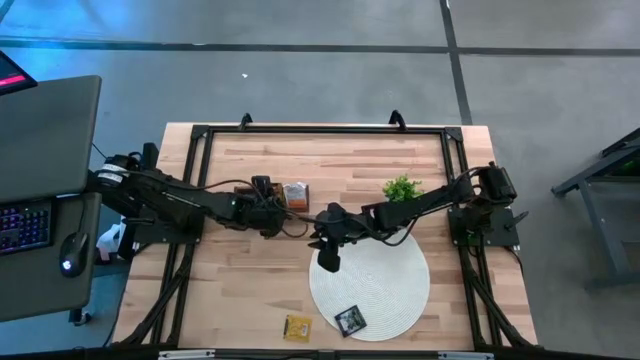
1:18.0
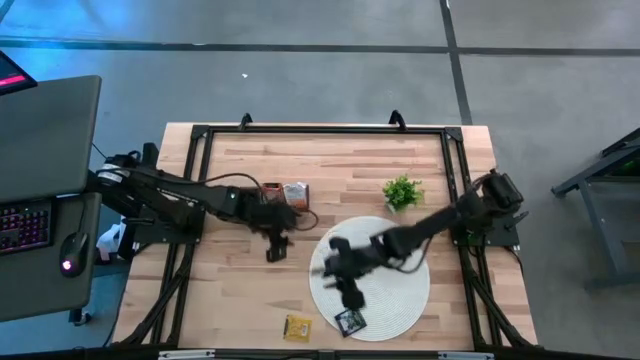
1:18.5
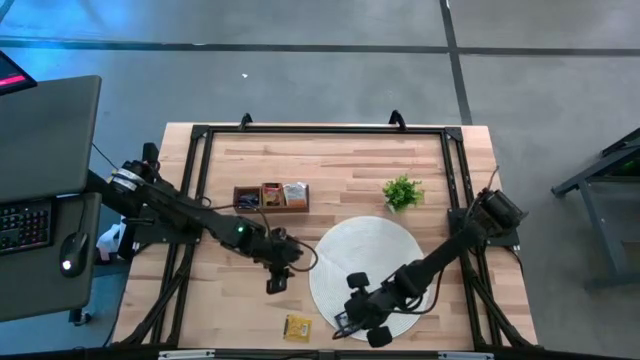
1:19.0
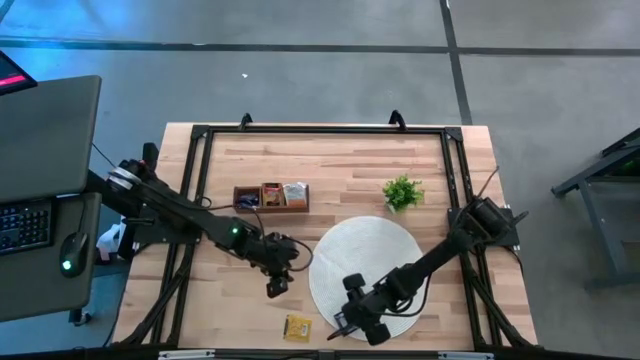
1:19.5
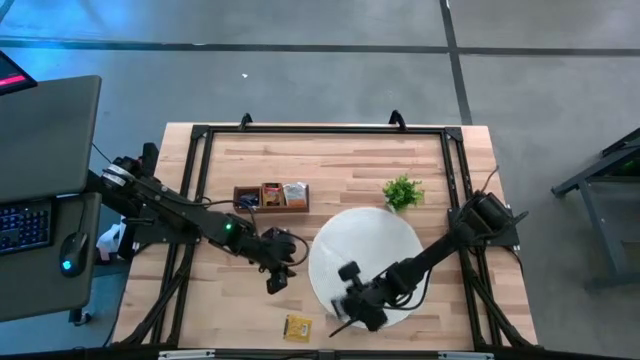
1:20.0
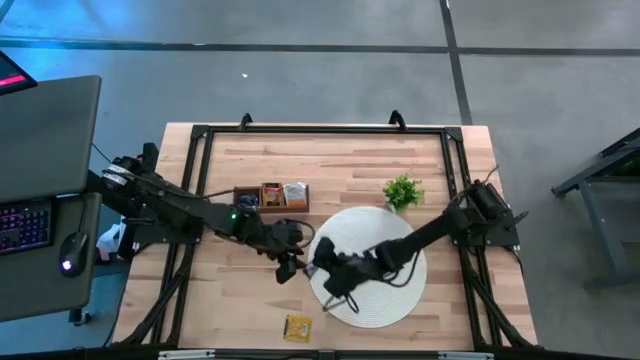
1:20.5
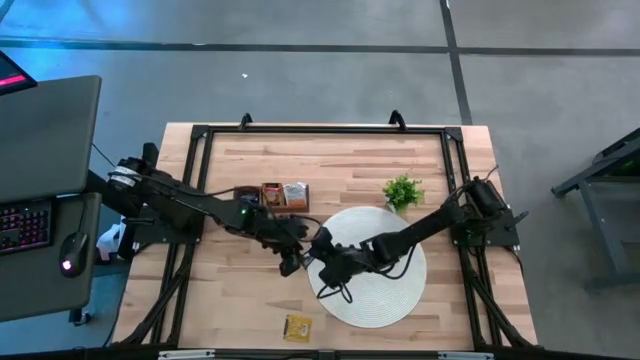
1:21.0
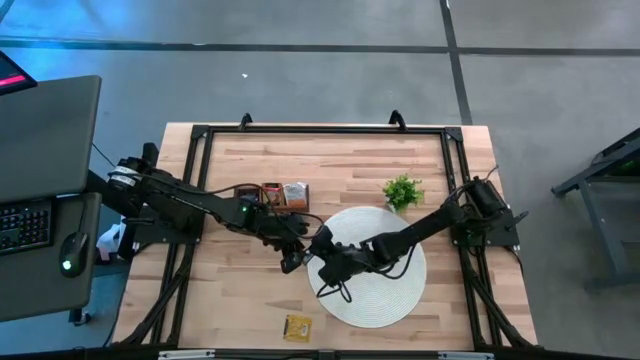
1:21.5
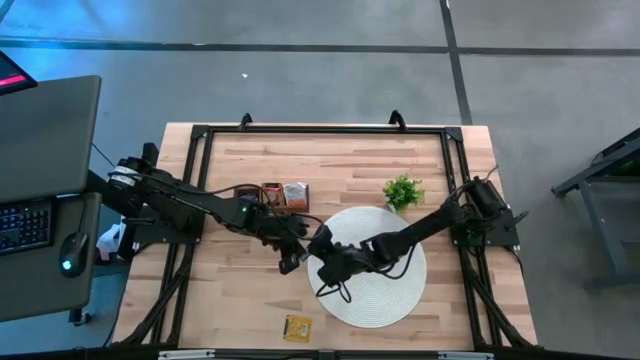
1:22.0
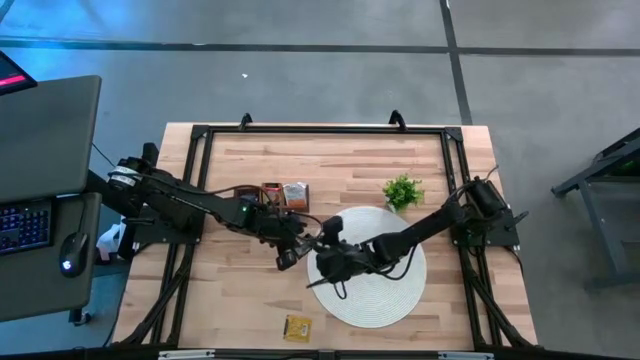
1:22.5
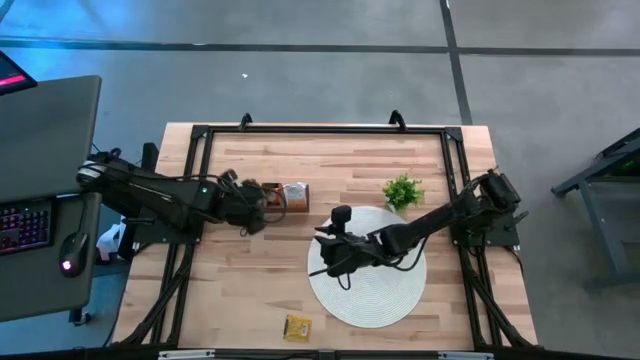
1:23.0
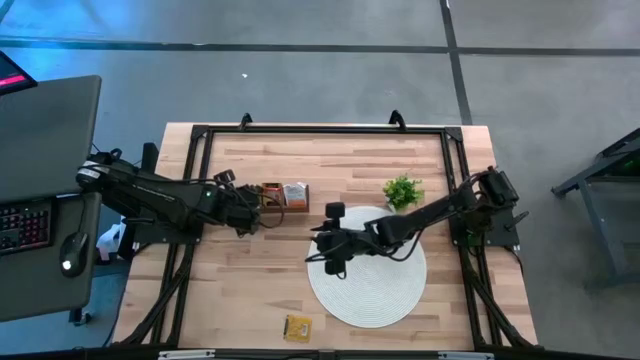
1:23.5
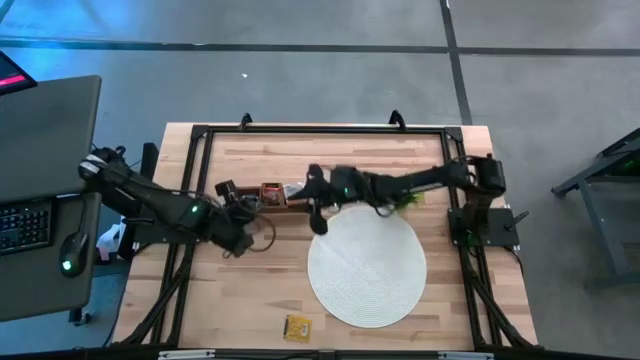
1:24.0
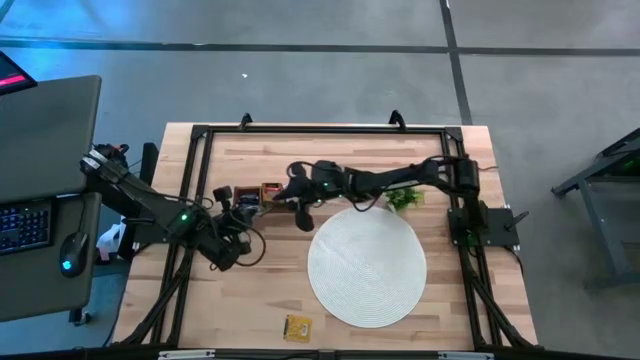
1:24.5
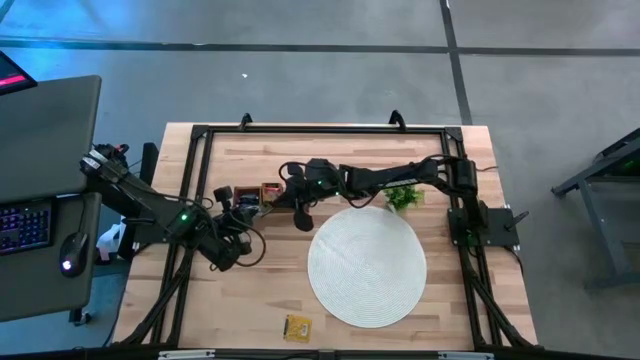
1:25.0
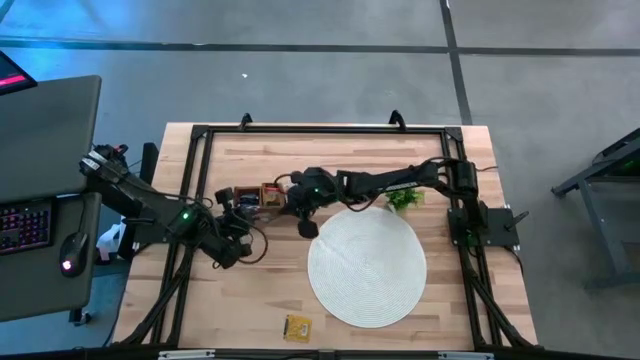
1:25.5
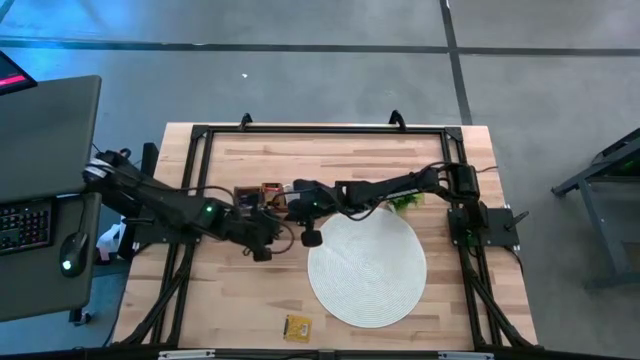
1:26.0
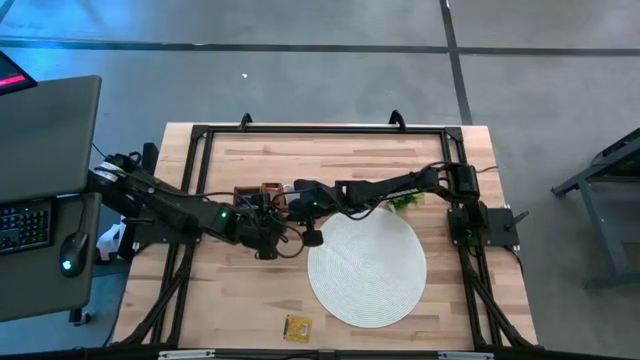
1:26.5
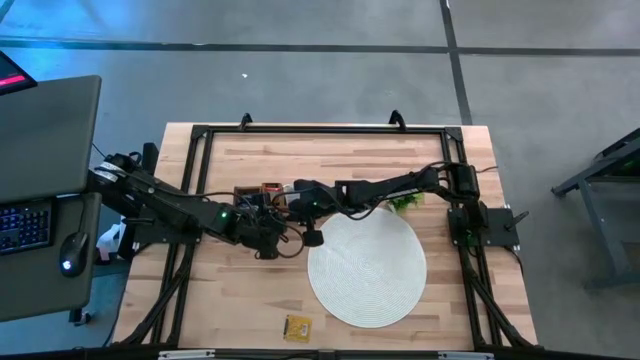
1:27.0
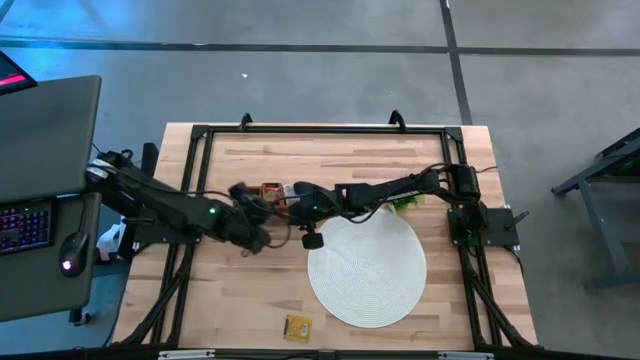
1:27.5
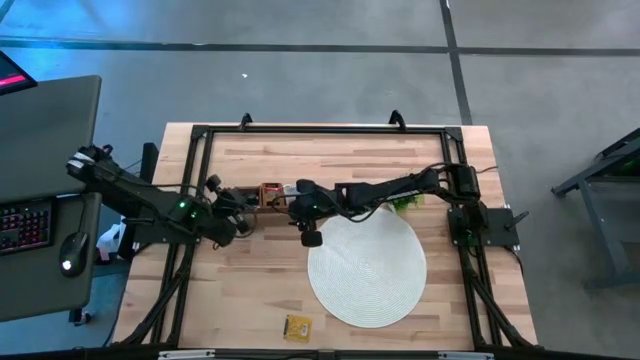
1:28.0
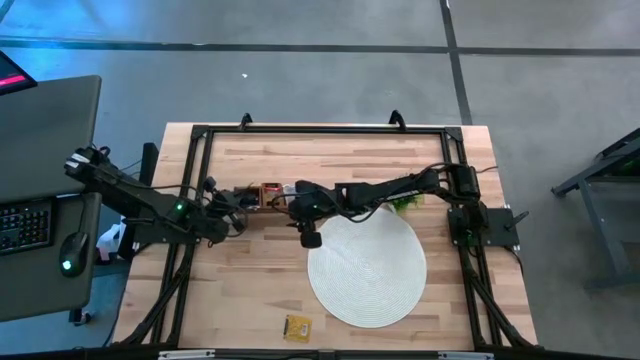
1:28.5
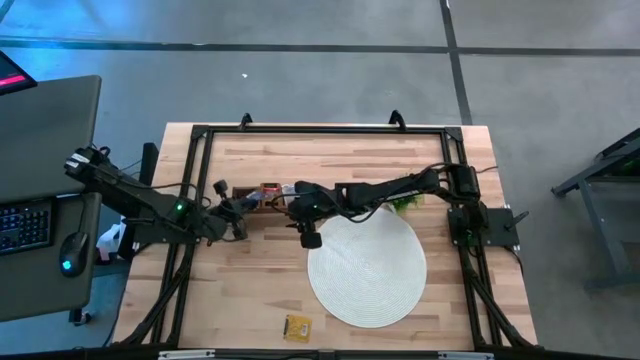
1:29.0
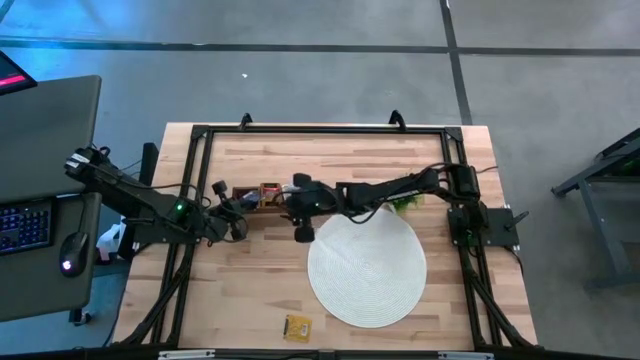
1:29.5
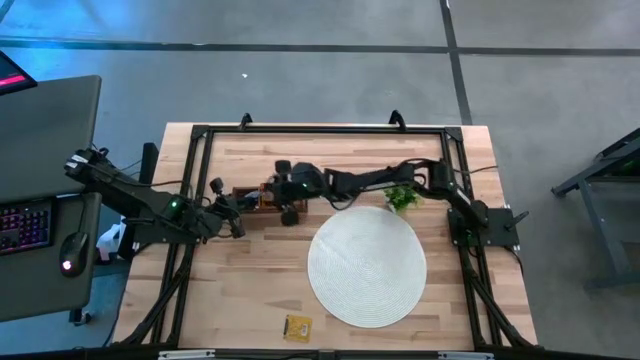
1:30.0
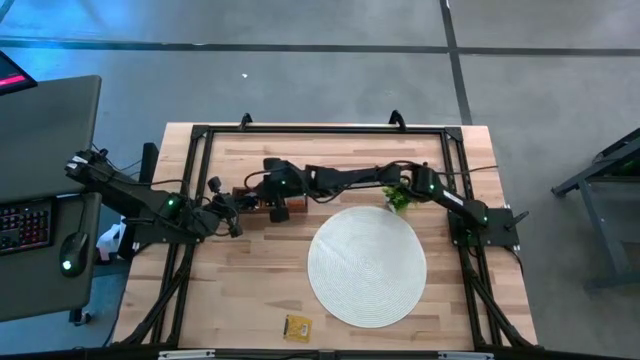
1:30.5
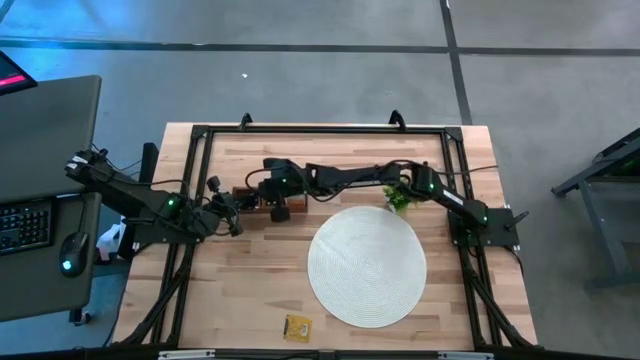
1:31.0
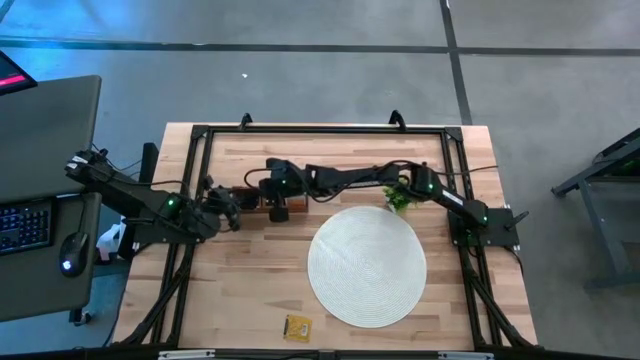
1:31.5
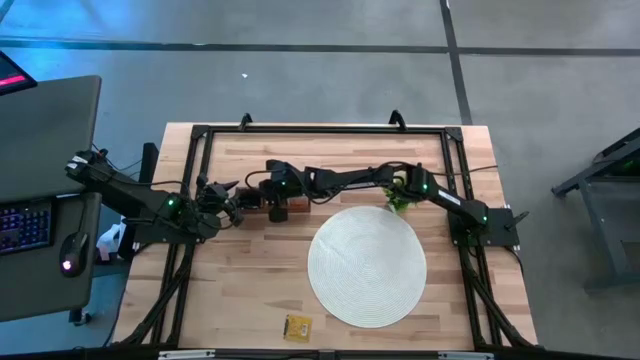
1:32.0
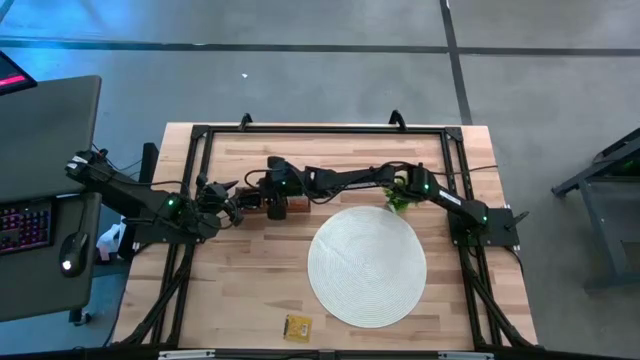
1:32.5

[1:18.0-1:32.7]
Task: Pick & Place Tea
Put the violet tea bag into the left section of the wooden organizer

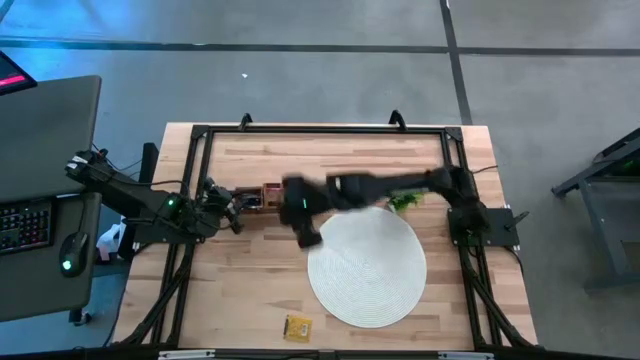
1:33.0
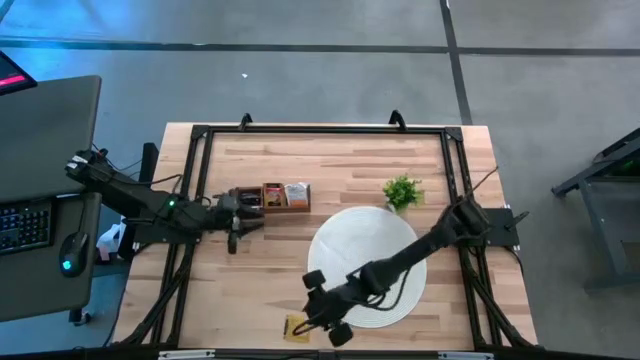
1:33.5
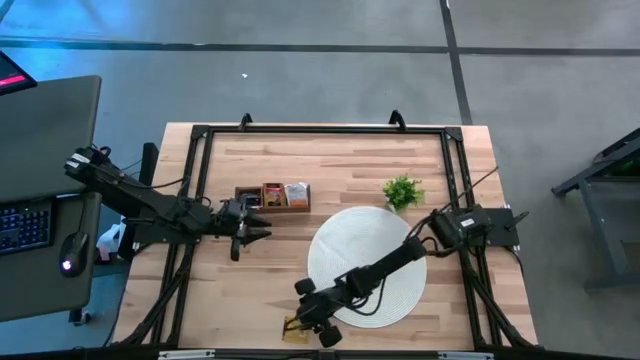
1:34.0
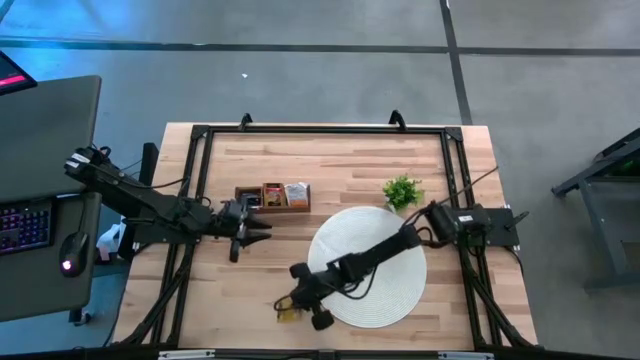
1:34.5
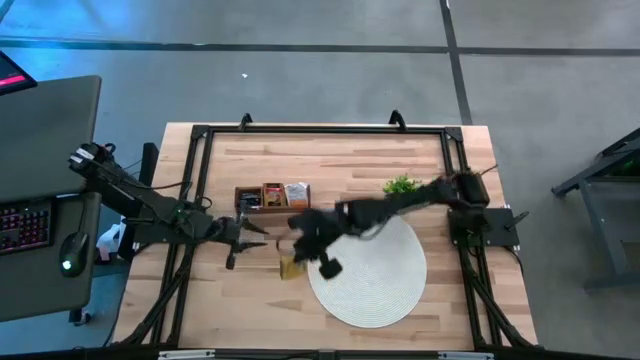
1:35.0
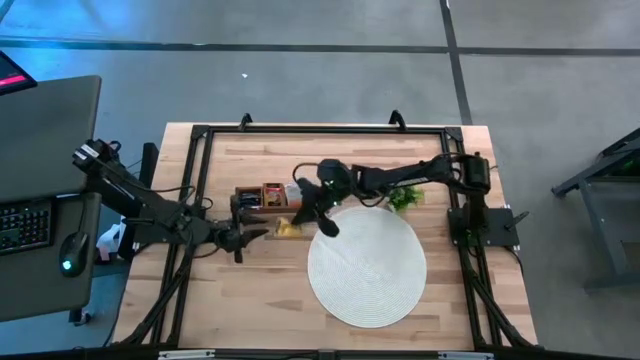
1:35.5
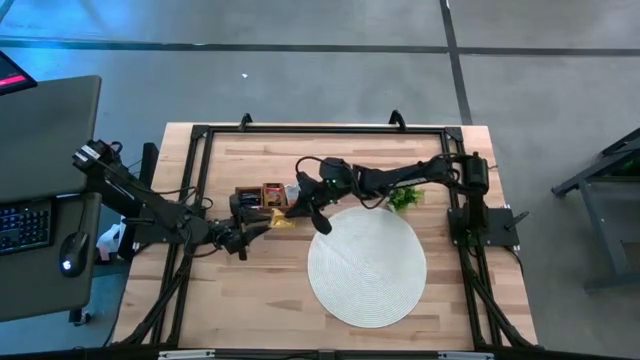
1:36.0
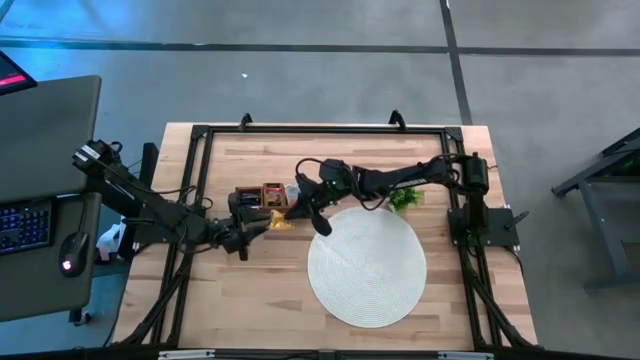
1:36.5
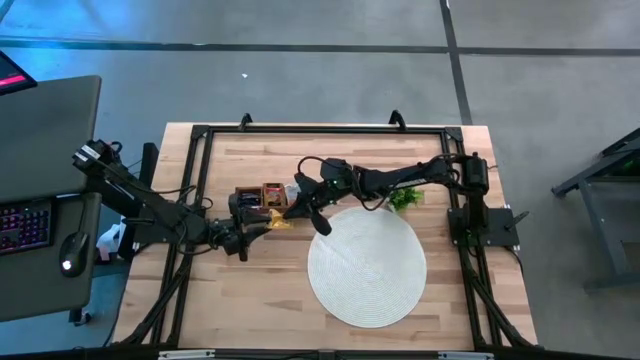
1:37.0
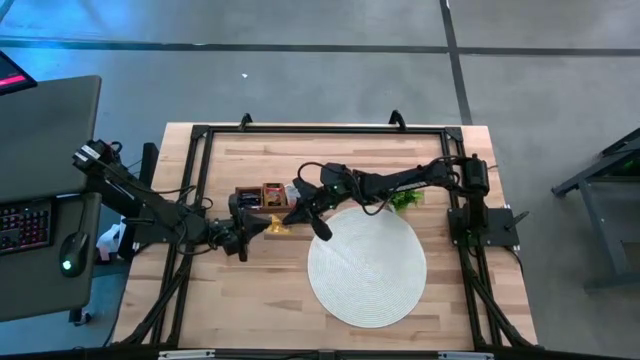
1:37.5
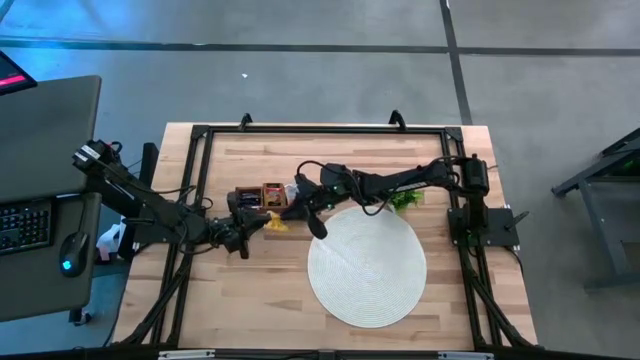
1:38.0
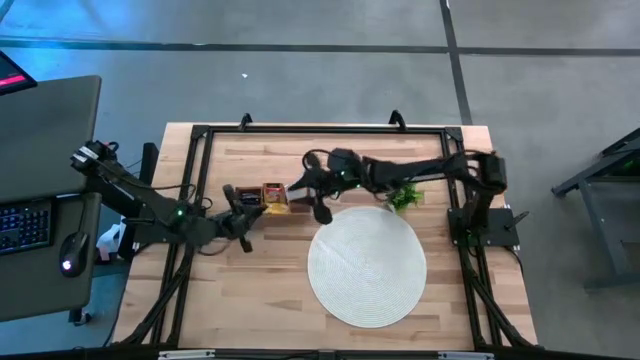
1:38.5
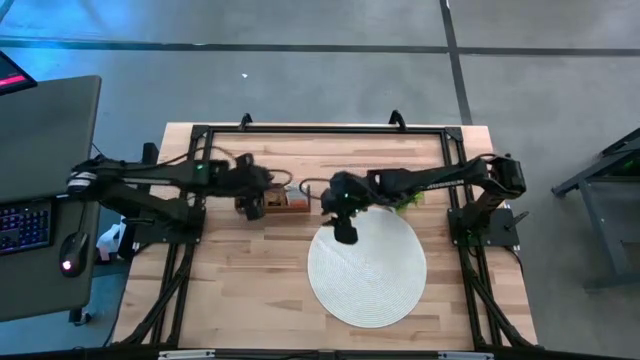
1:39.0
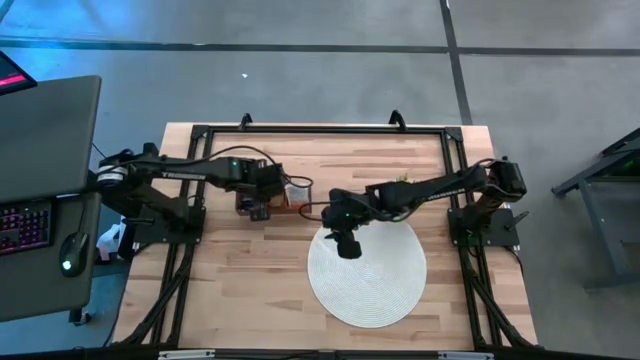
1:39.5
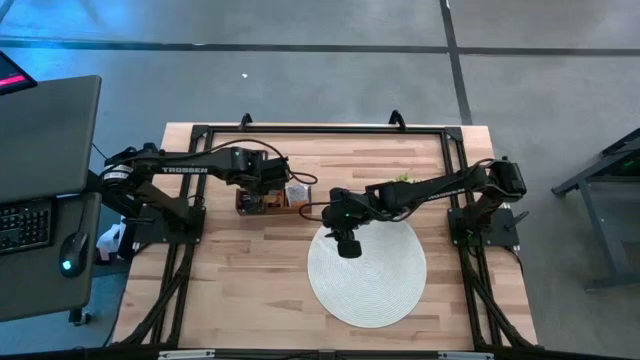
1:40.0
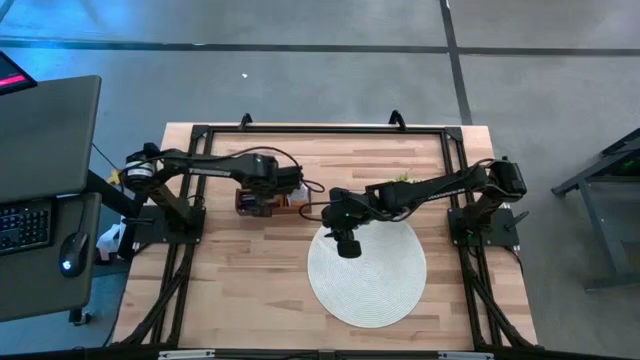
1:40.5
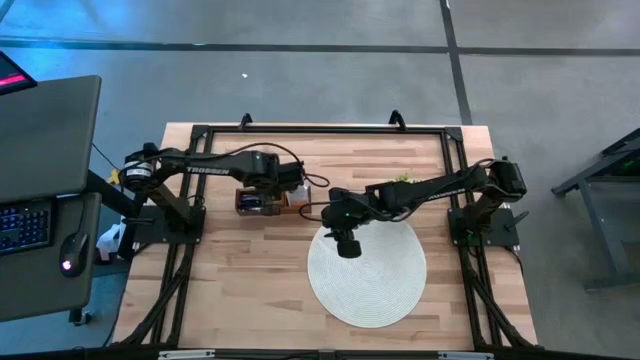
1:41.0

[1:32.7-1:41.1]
Put the yellow tea bag into the middle section of the wooden organizer
